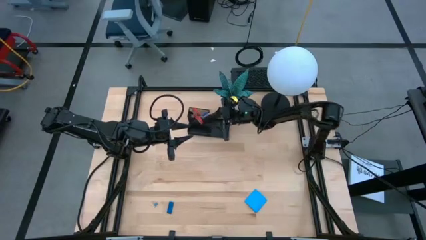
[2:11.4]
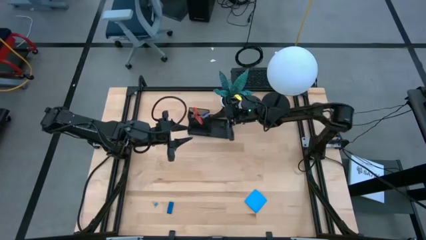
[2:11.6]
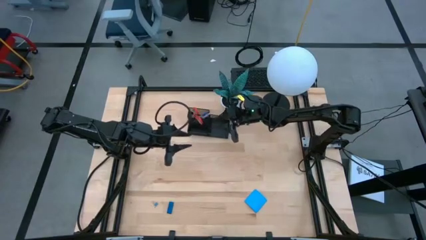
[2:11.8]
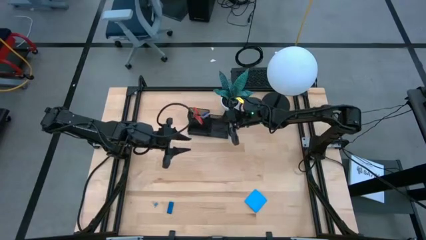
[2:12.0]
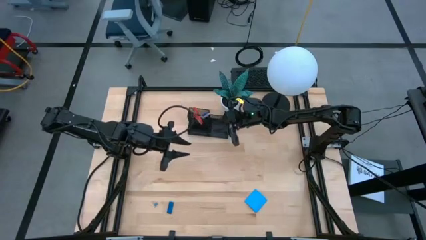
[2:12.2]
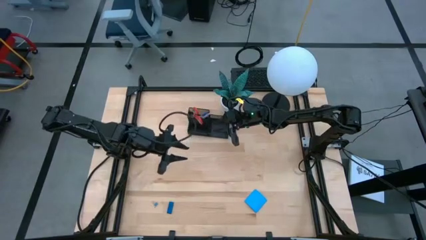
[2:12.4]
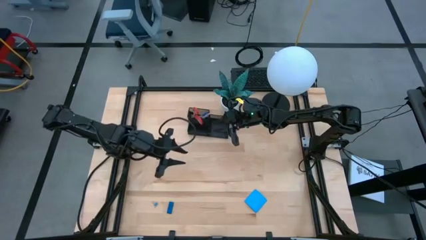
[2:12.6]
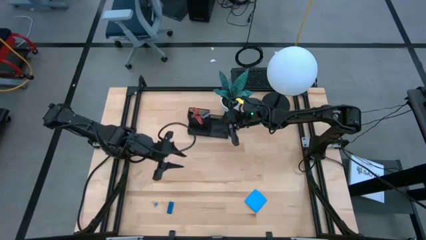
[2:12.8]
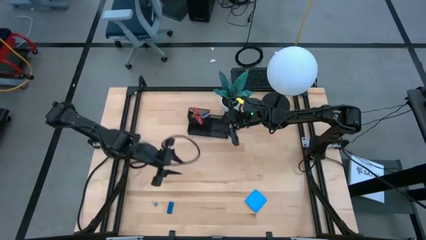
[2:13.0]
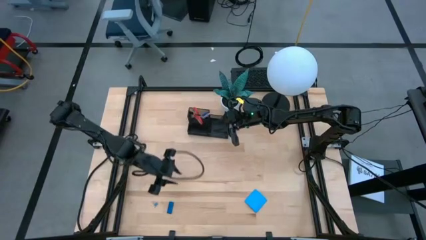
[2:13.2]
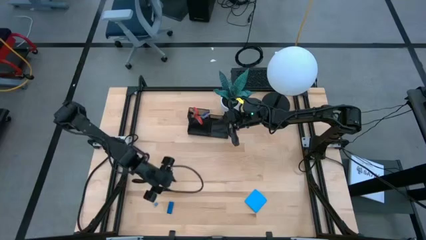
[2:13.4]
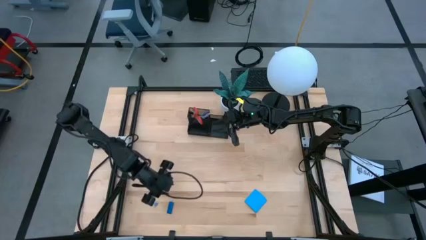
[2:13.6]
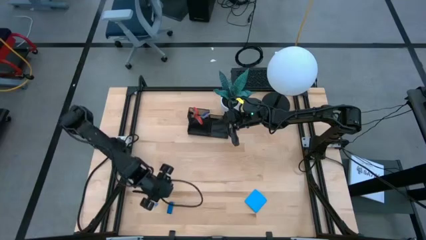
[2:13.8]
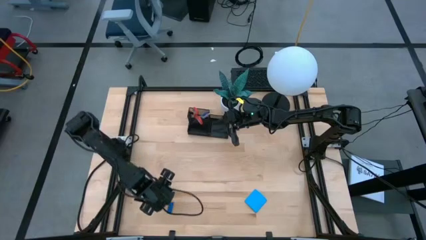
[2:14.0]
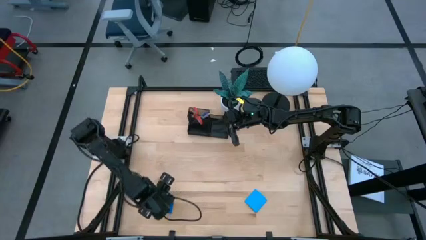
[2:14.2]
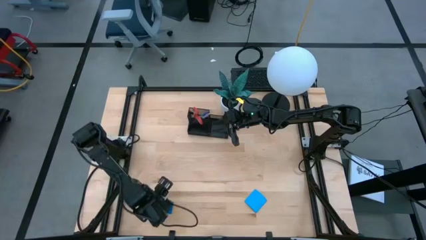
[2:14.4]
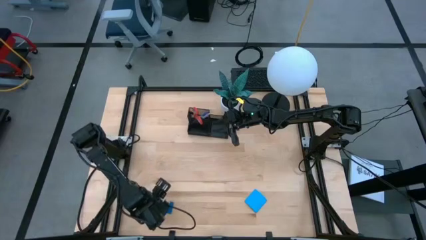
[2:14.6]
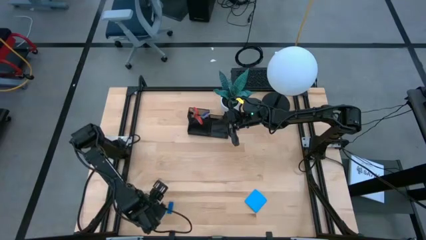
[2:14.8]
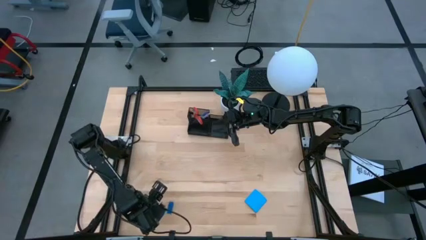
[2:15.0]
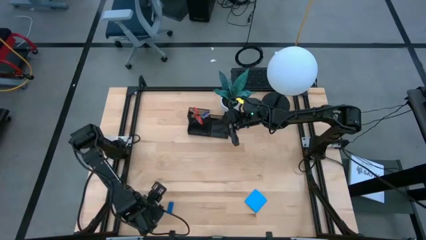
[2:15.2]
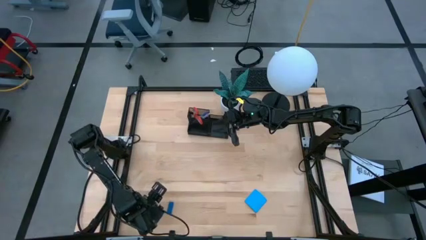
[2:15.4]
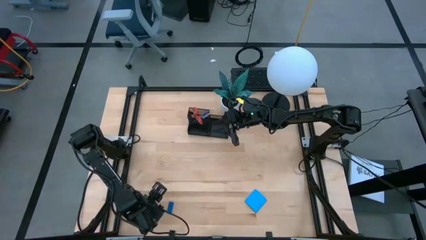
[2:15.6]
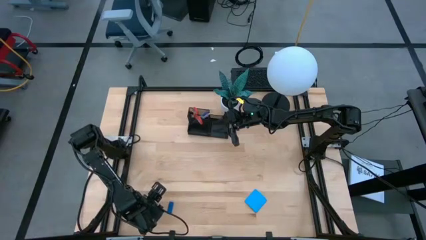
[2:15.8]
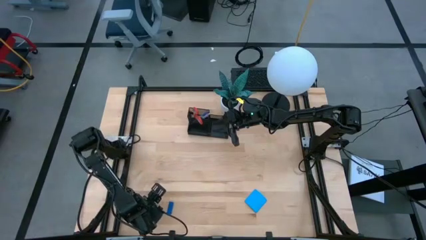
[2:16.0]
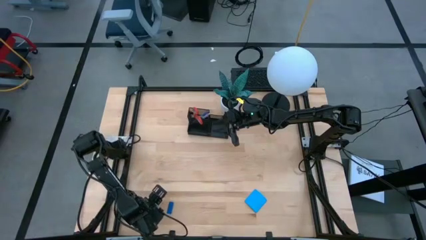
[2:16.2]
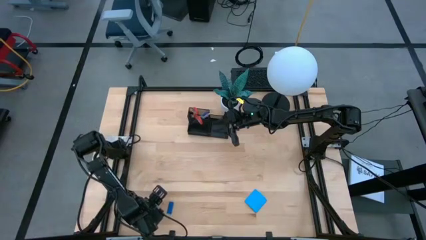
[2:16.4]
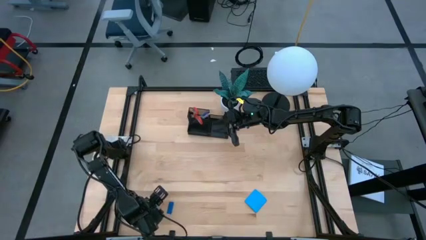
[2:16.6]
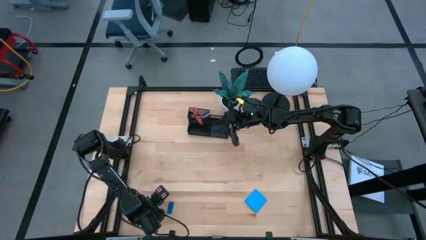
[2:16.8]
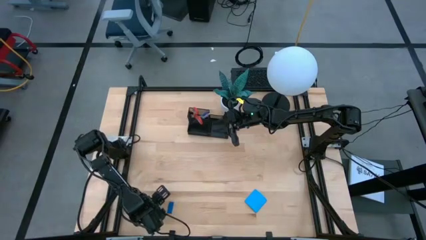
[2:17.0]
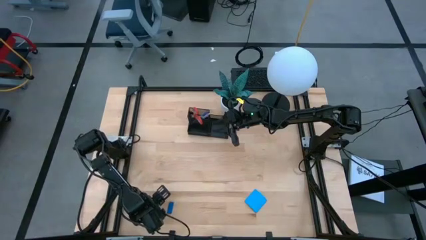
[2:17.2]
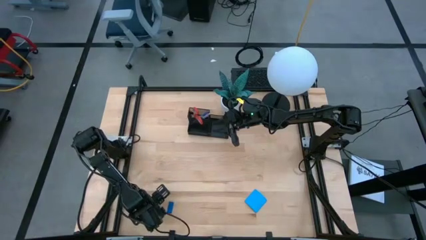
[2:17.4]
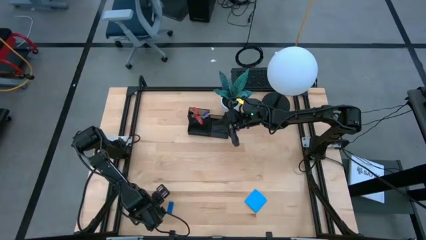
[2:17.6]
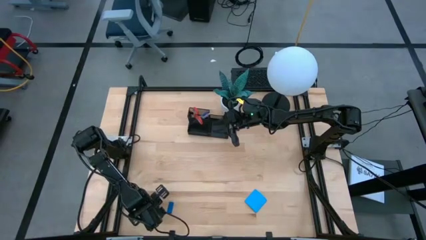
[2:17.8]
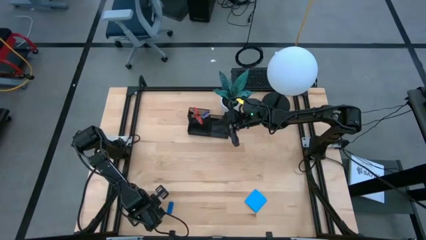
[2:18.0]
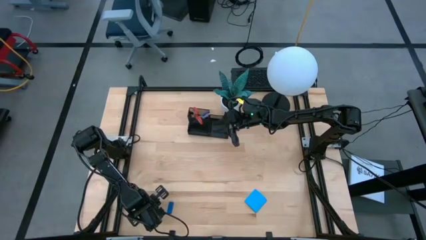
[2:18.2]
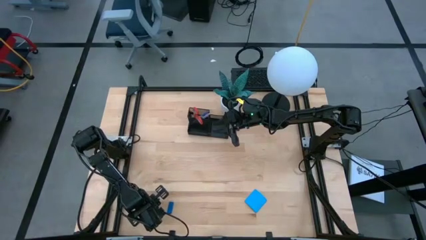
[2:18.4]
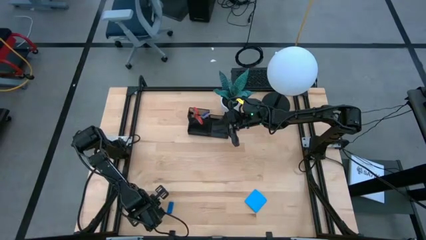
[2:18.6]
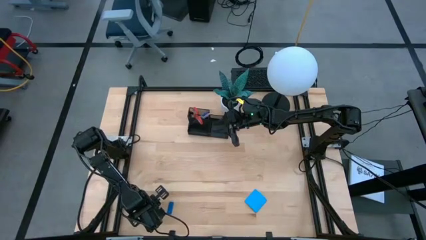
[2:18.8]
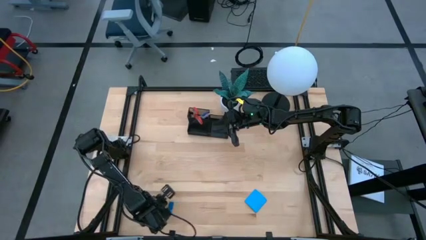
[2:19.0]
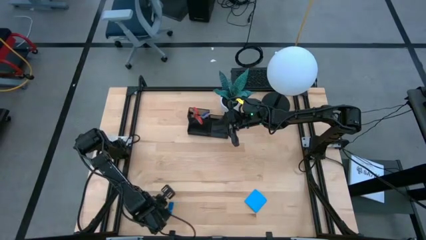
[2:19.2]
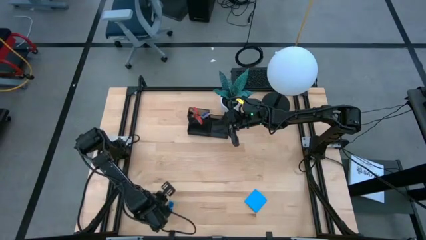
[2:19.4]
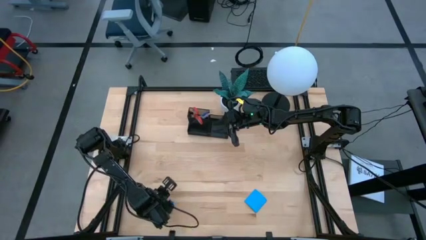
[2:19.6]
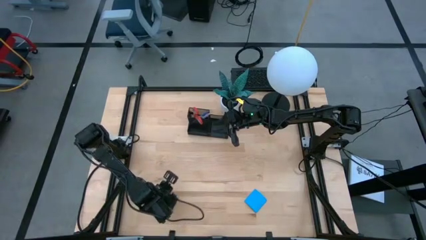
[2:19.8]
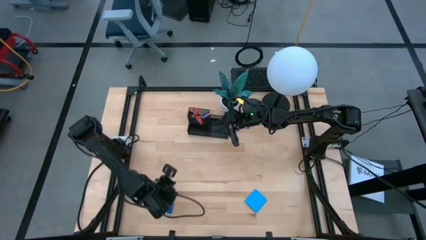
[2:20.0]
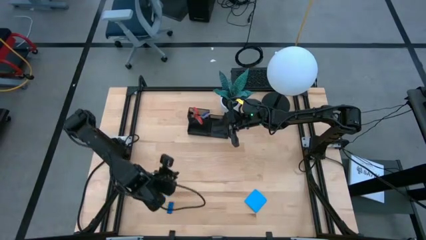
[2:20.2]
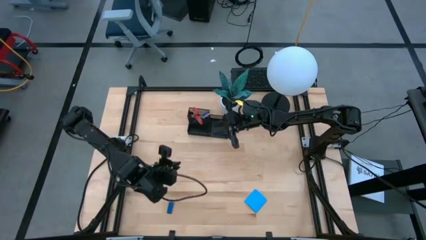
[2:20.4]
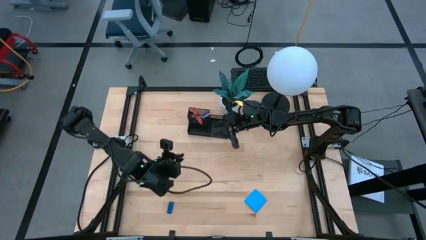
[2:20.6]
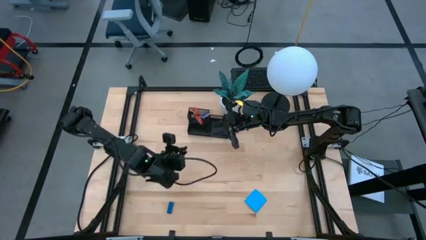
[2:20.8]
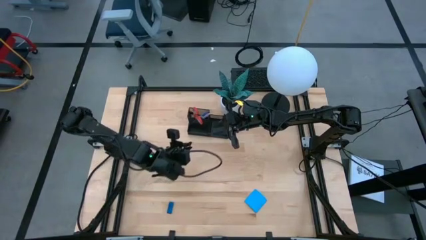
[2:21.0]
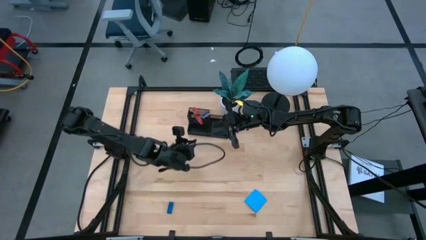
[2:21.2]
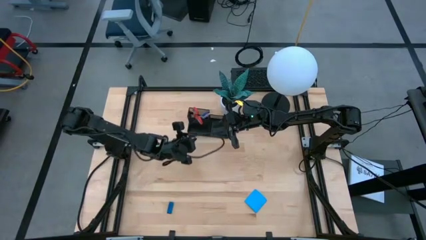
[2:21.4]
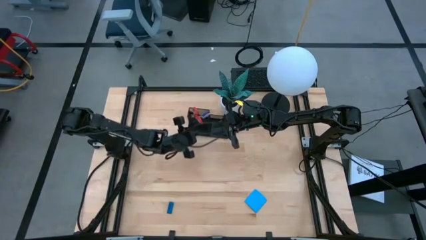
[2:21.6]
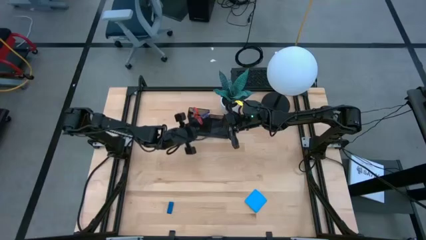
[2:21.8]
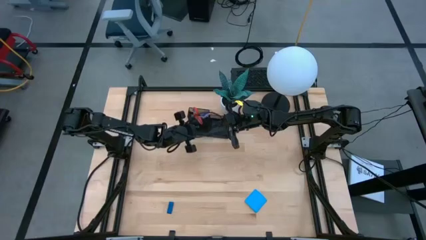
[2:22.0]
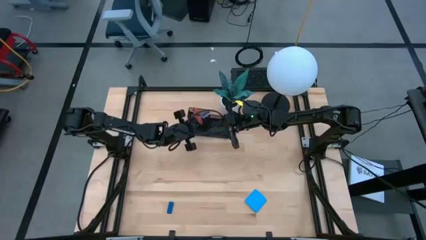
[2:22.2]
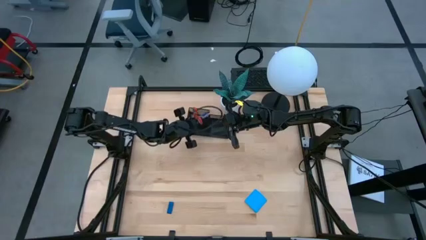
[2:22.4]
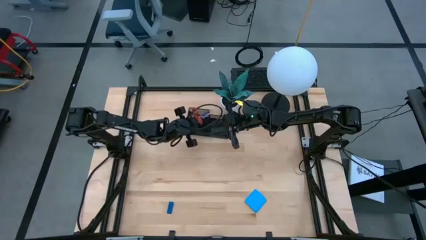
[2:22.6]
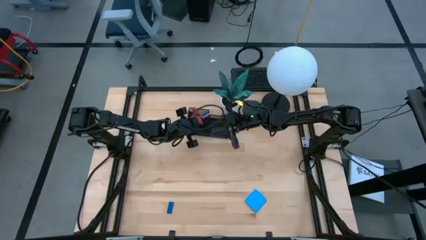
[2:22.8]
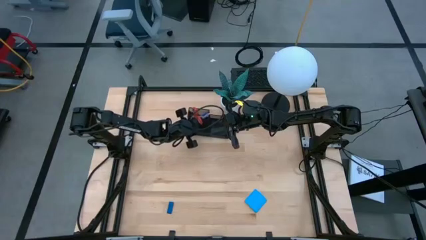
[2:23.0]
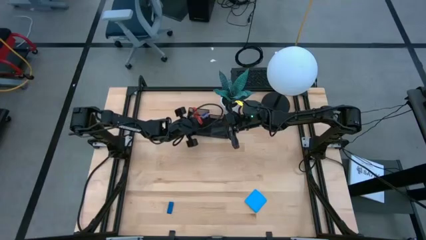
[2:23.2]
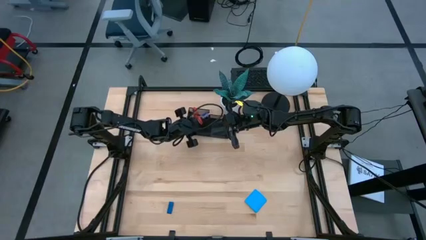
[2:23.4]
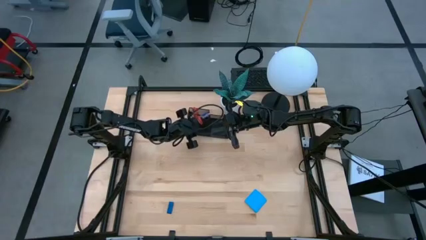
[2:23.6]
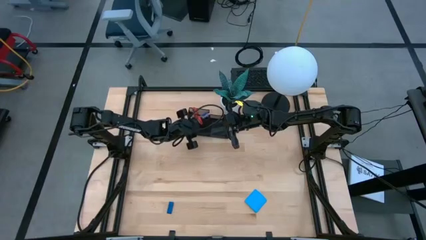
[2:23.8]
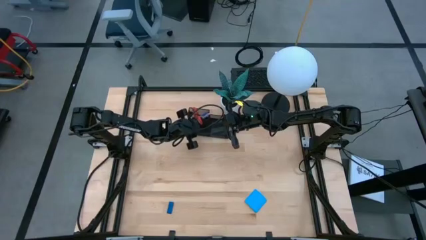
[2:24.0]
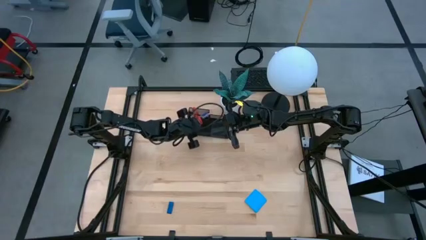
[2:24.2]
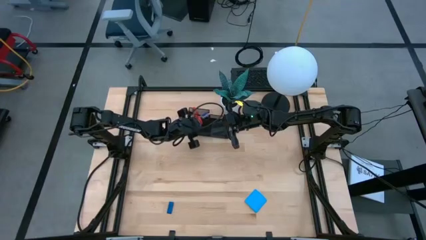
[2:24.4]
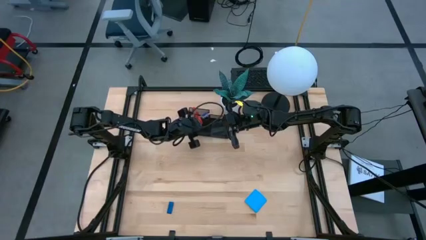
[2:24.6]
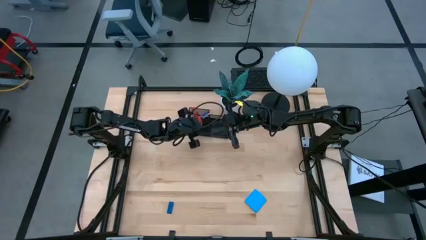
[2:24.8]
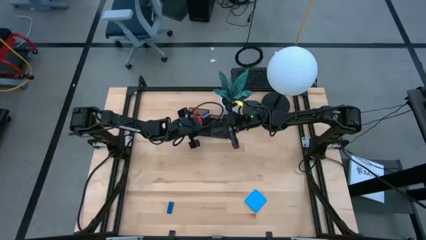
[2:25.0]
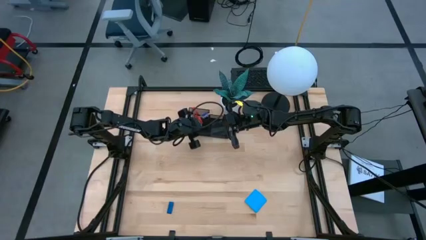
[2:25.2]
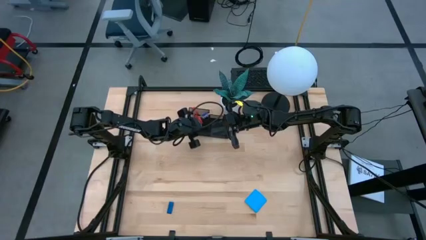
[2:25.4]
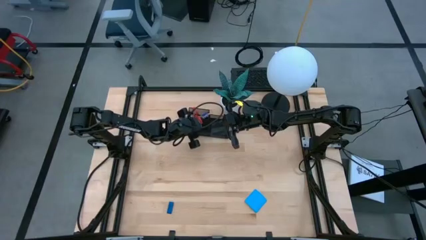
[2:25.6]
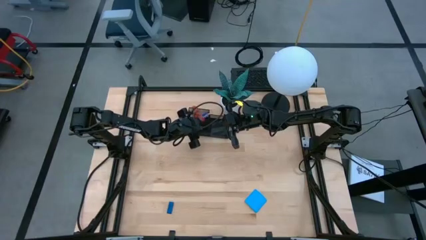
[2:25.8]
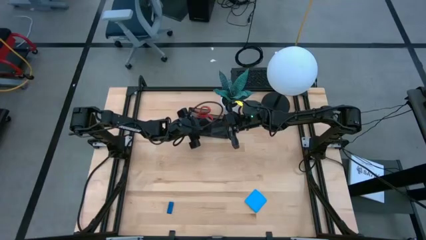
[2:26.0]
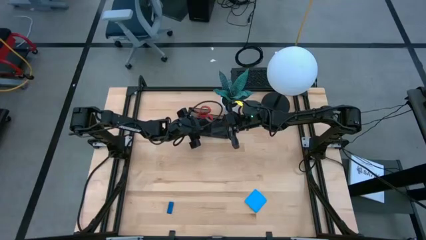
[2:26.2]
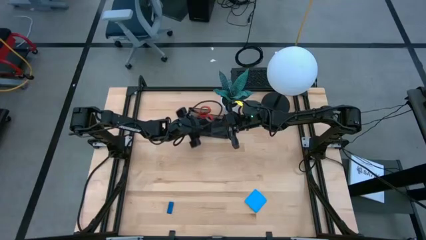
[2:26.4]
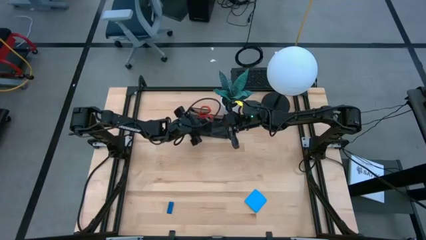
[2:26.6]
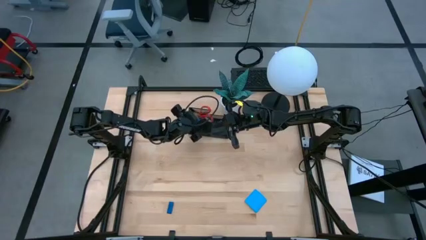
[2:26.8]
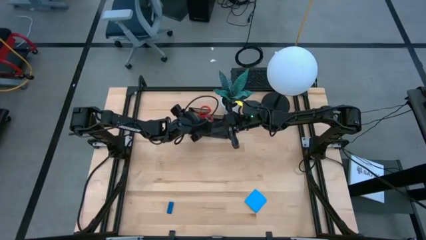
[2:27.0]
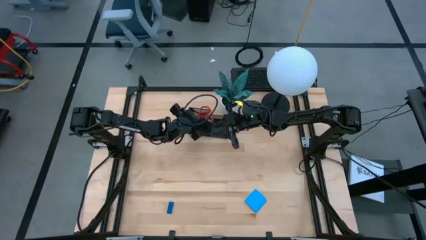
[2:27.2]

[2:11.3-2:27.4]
Task: Pick and place office supplies into organizer
Put the blue paper clip into the black desk organizer
